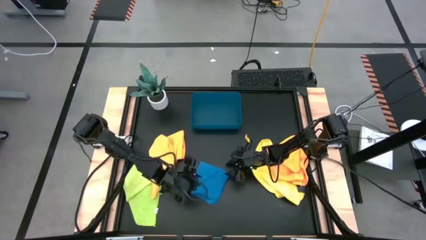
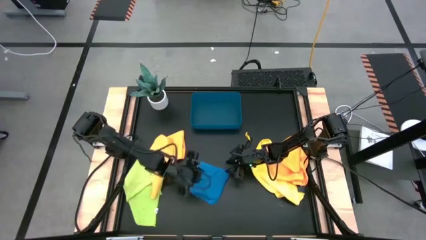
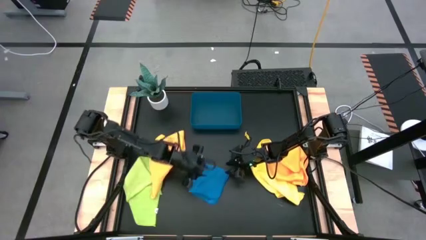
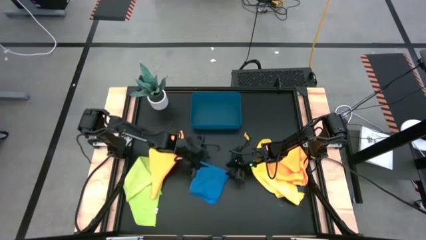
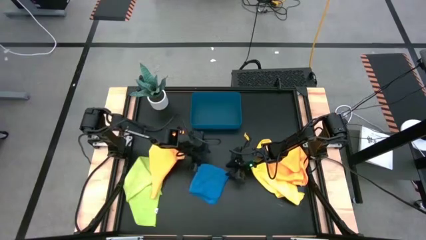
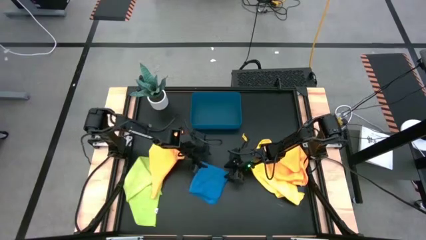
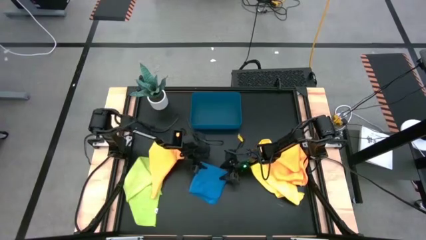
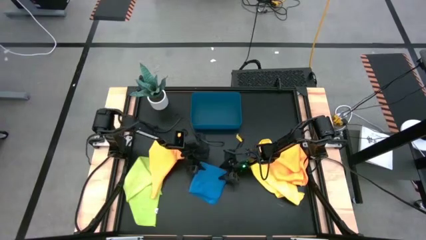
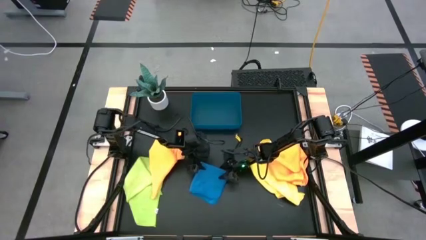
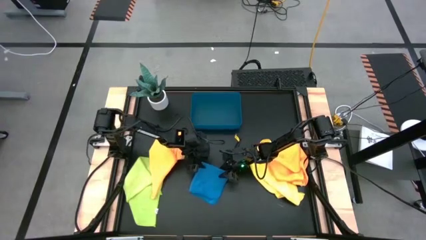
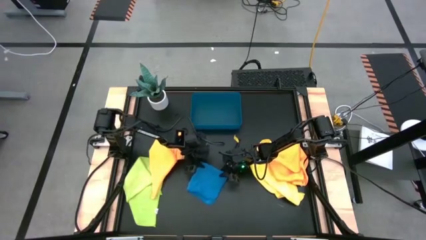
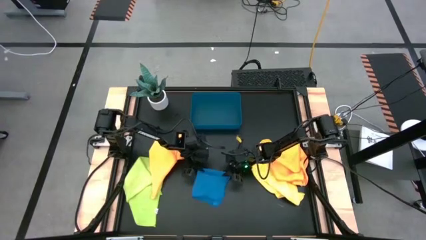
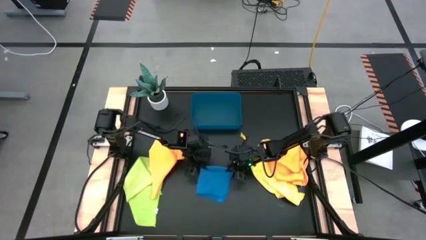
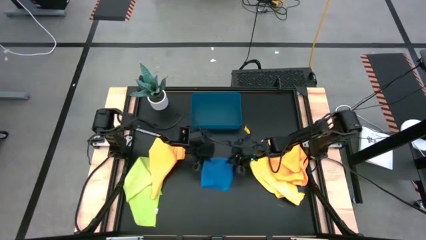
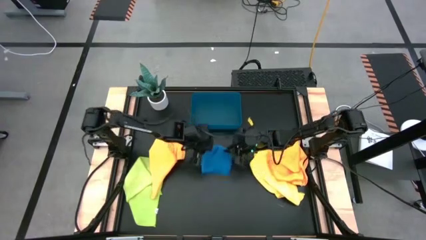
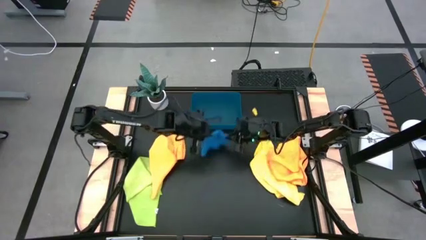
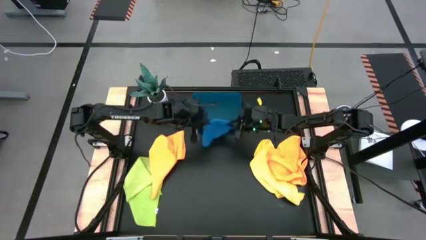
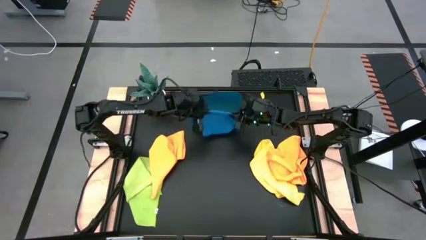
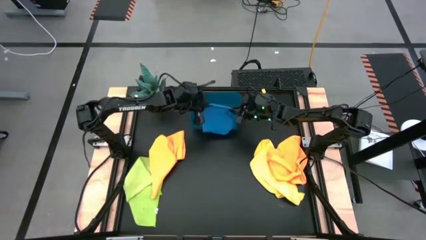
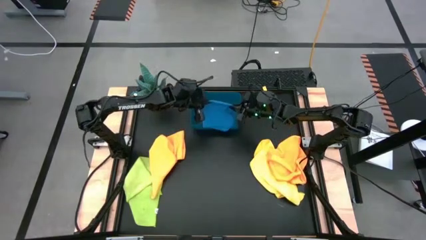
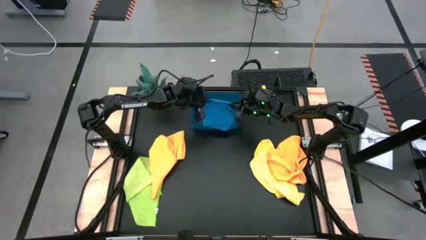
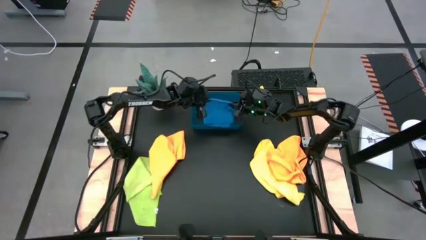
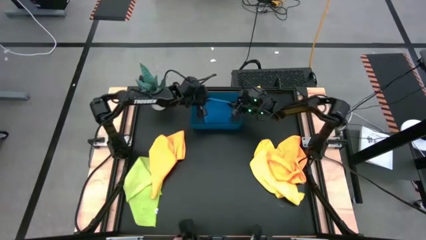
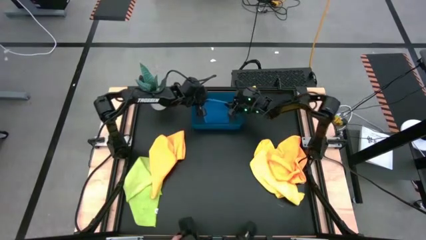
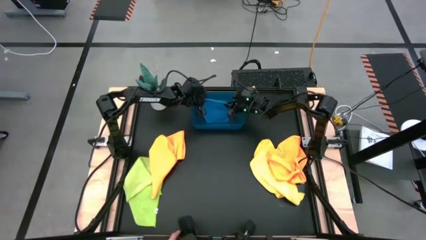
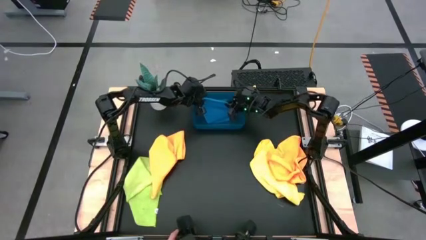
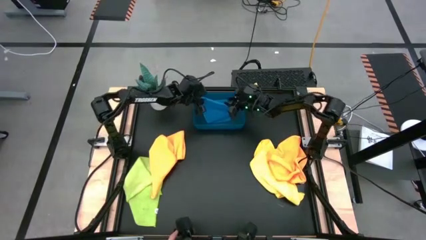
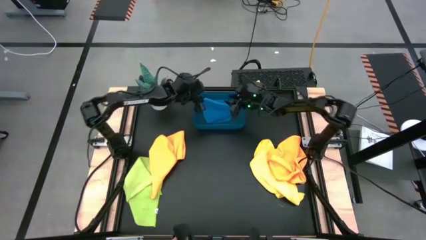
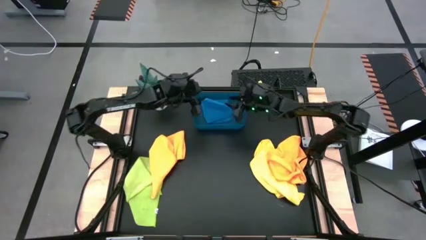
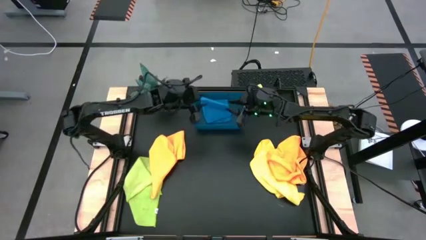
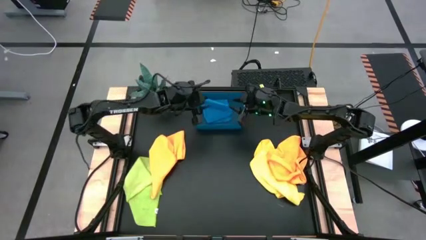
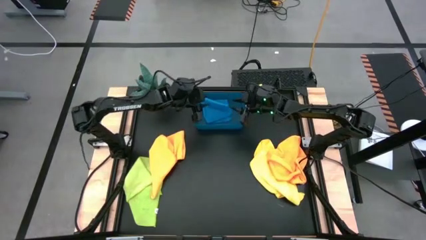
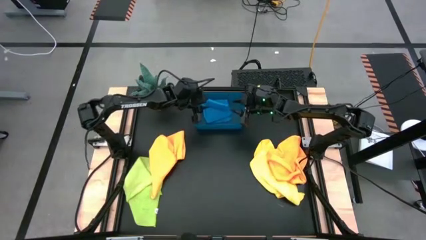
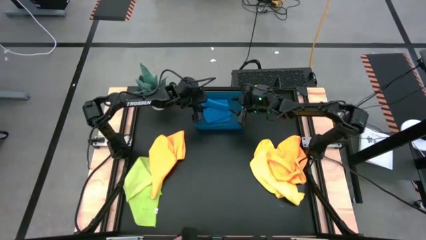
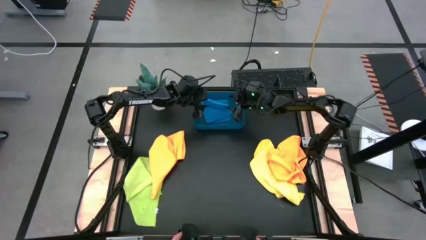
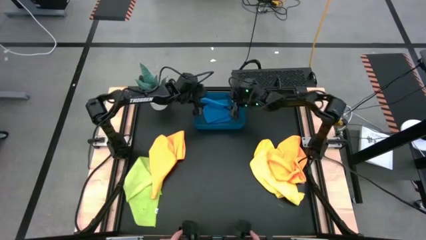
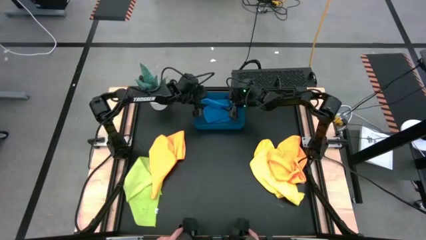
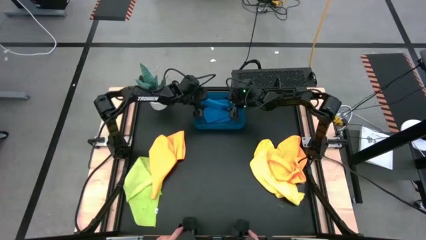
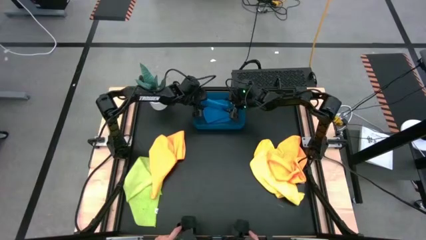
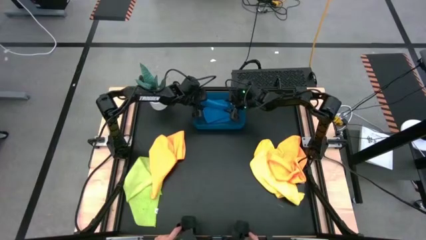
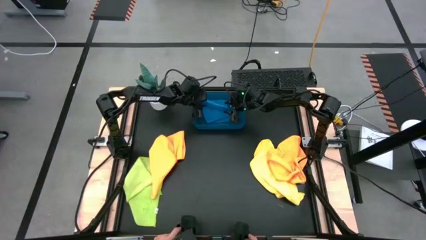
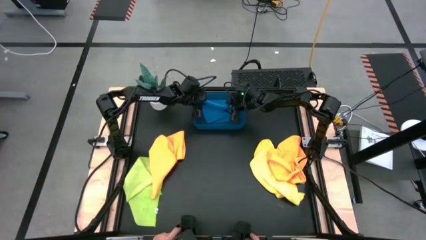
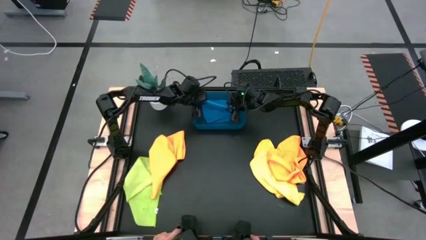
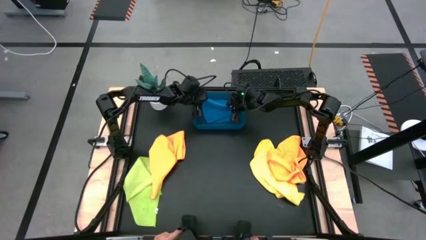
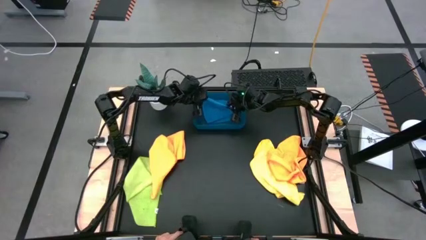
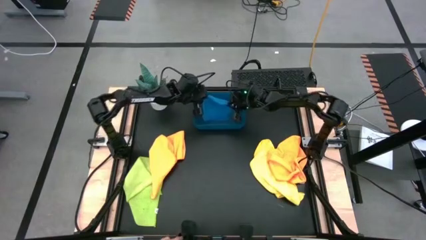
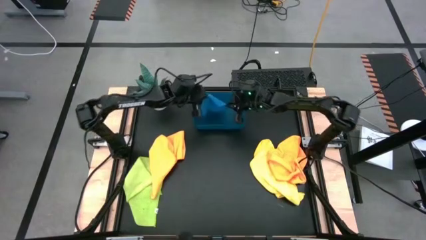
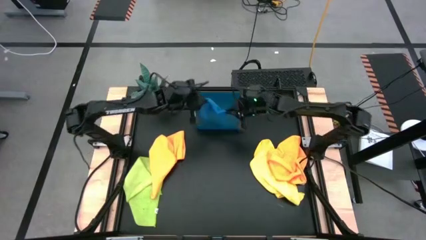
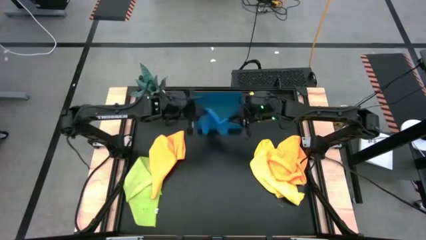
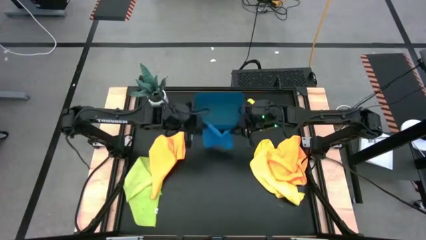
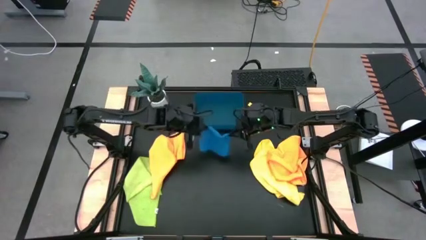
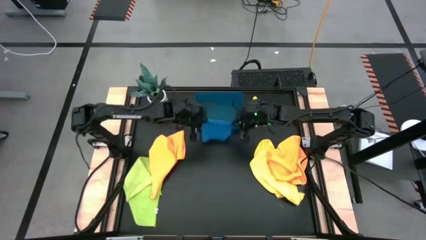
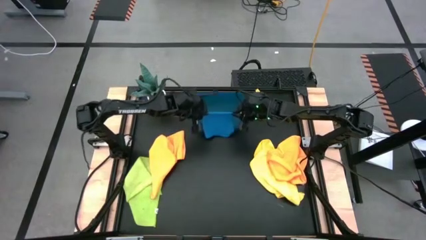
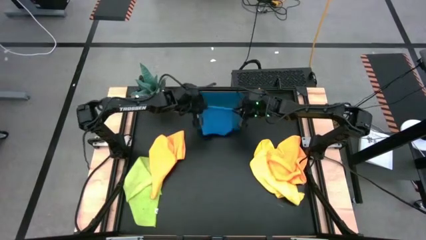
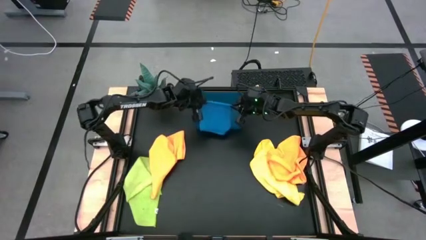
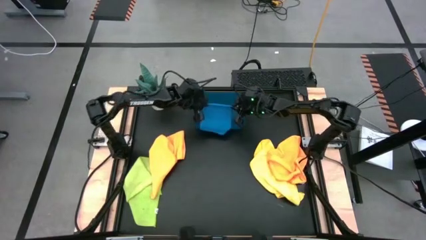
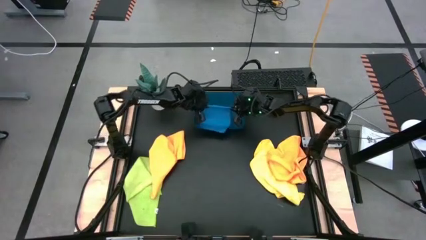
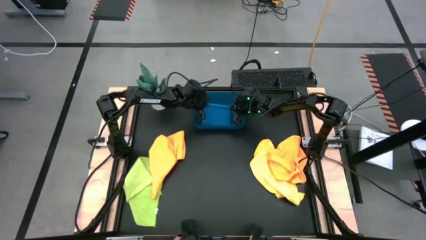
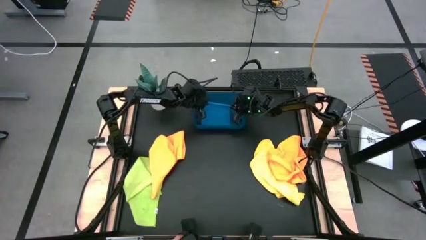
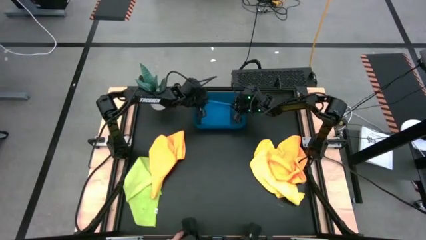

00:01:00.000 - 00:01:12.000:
Task: Fold microfiber towels
Put the blue microfiber cloth into the blue bin
